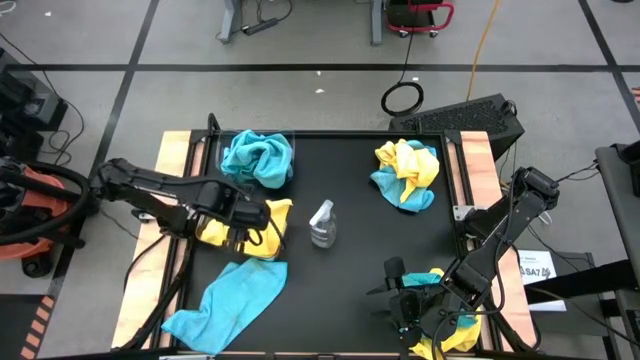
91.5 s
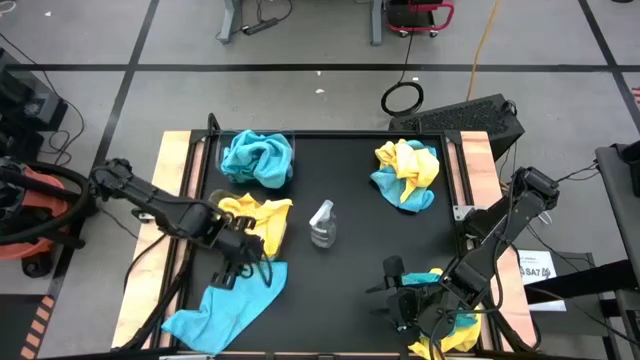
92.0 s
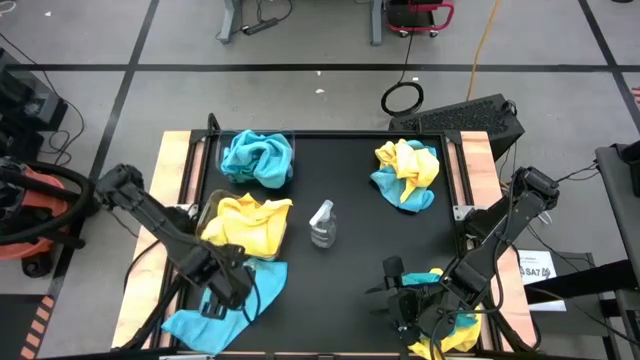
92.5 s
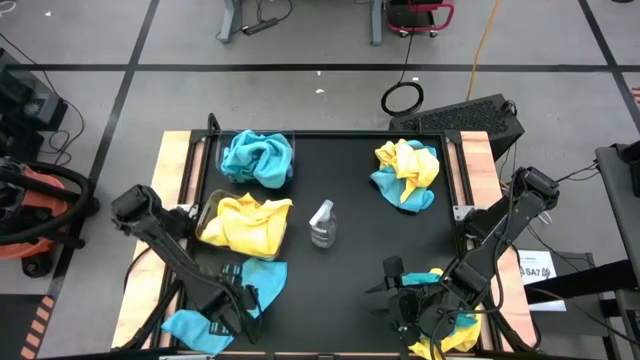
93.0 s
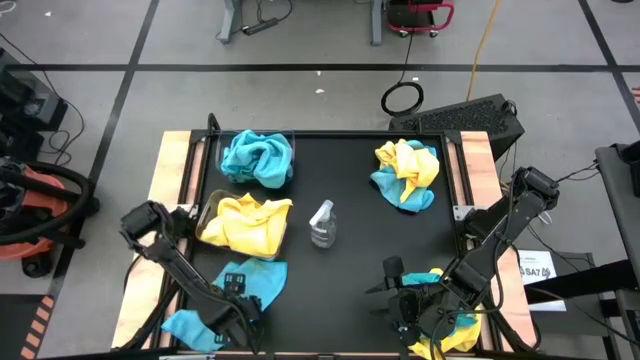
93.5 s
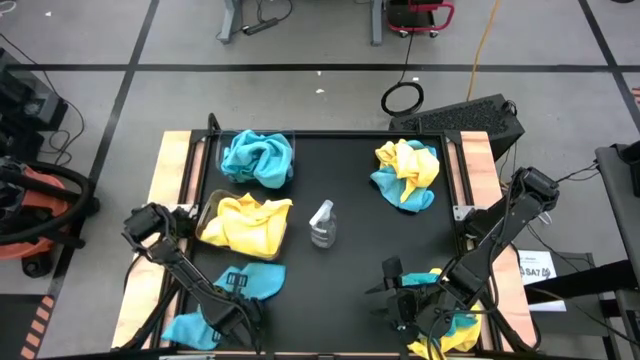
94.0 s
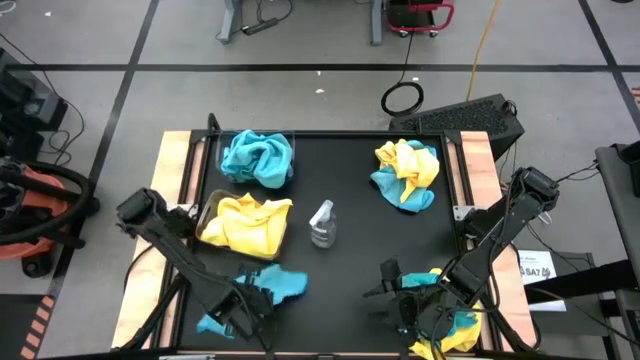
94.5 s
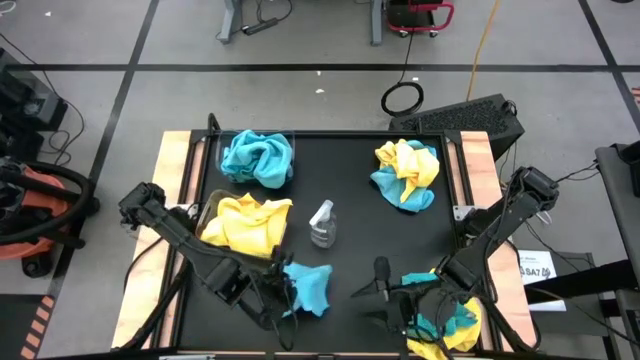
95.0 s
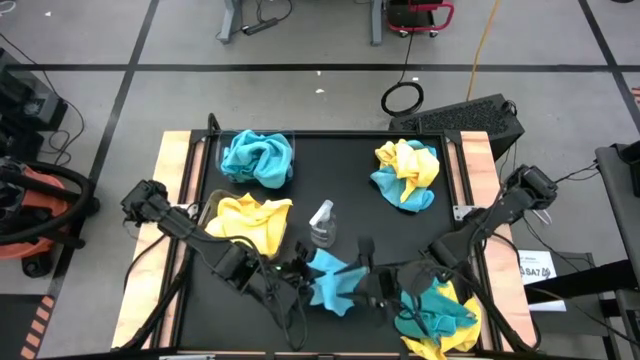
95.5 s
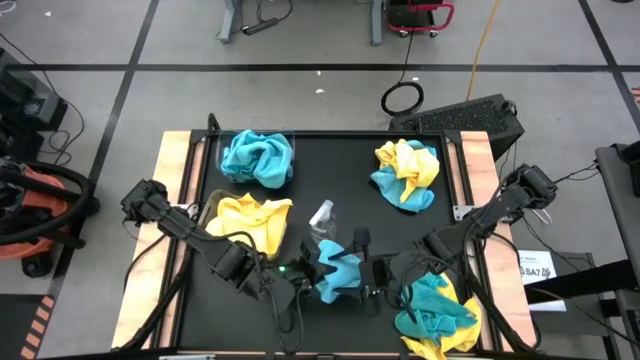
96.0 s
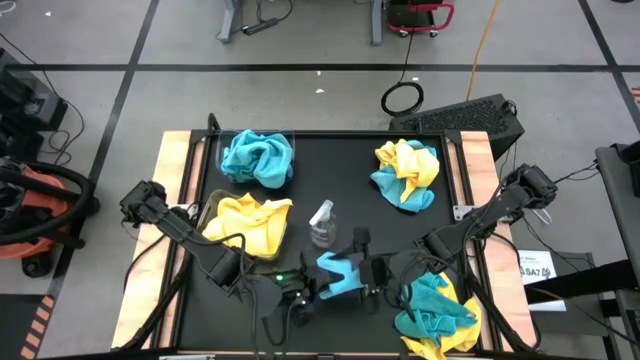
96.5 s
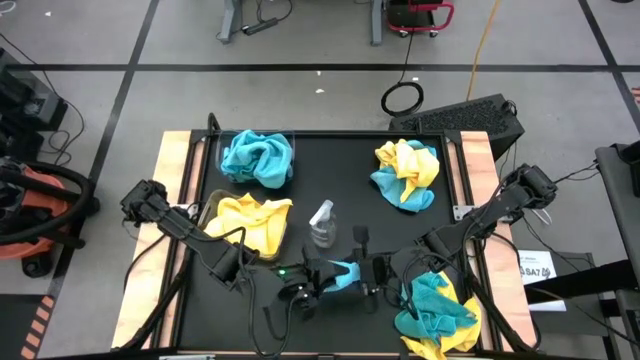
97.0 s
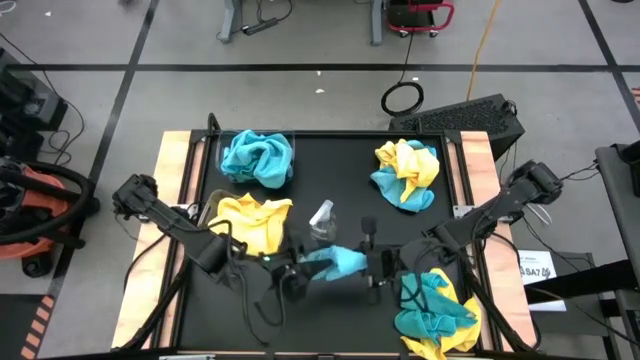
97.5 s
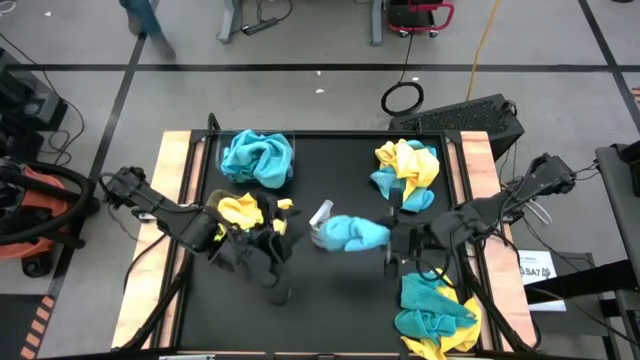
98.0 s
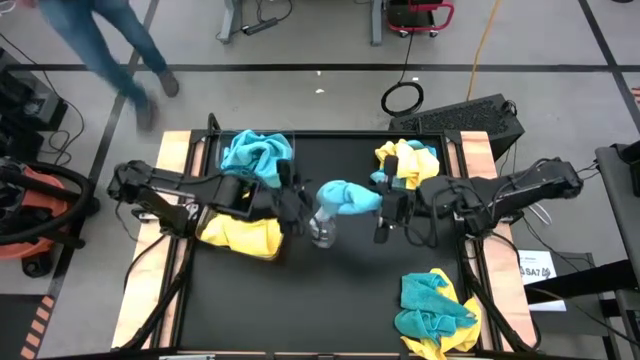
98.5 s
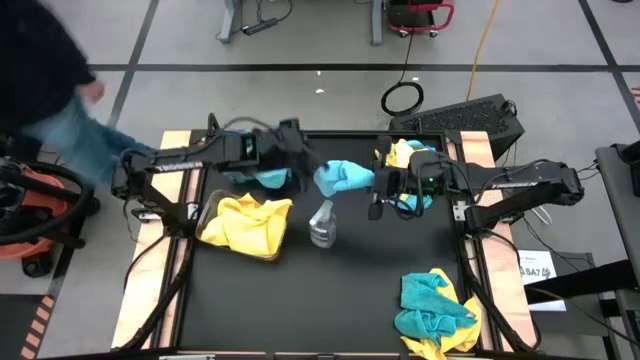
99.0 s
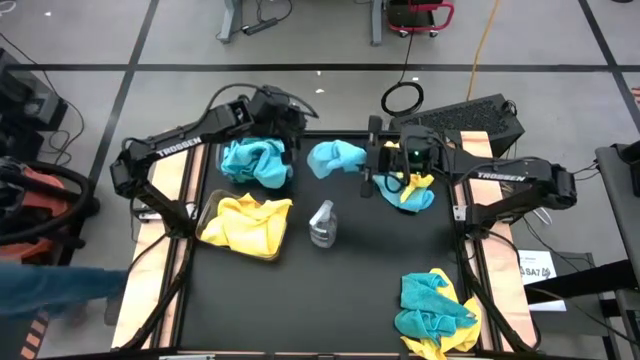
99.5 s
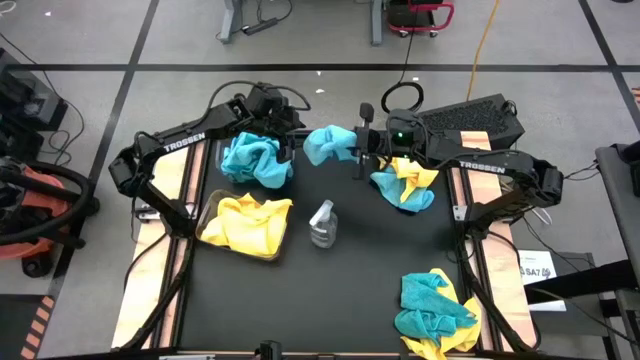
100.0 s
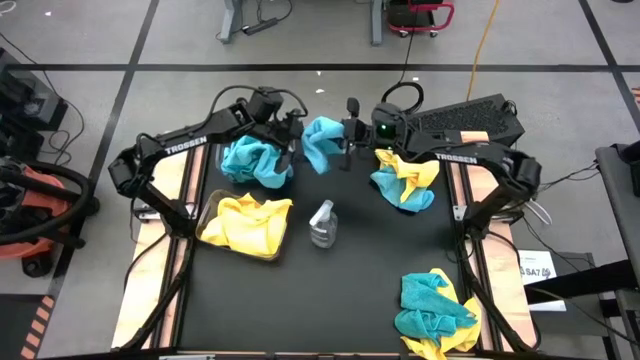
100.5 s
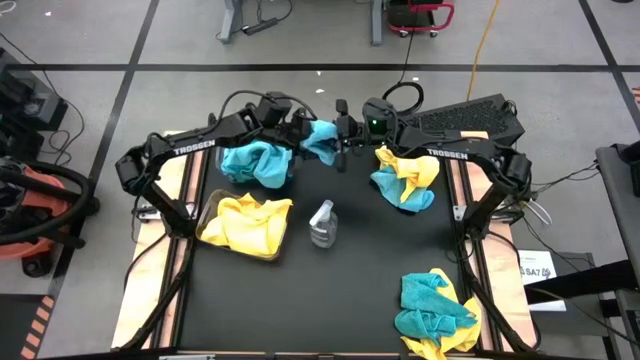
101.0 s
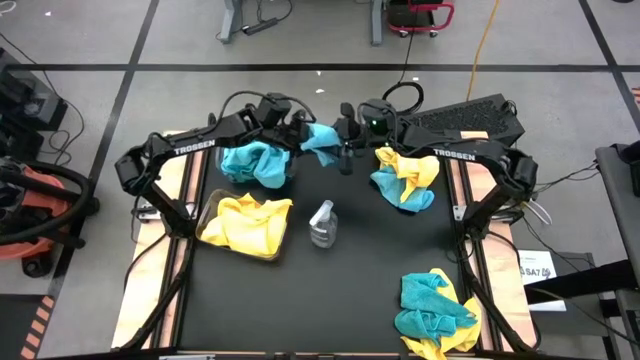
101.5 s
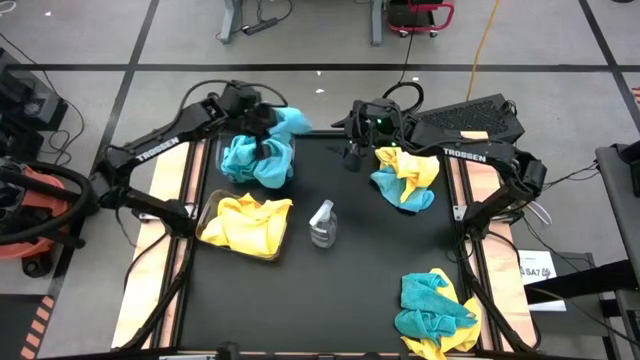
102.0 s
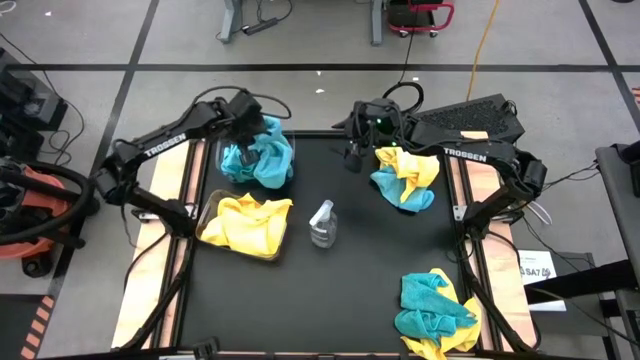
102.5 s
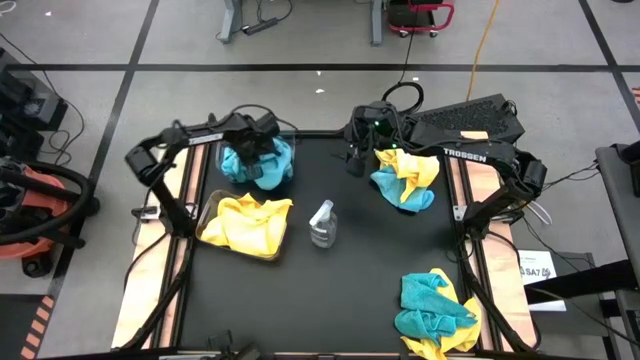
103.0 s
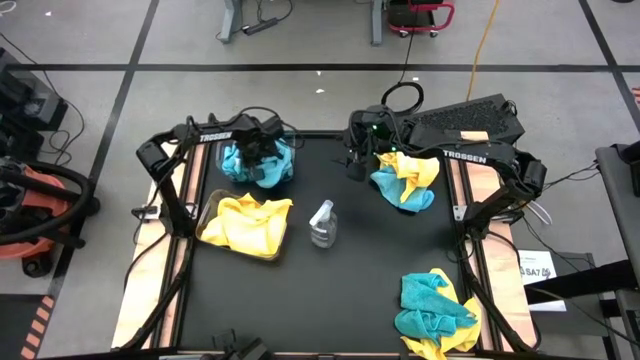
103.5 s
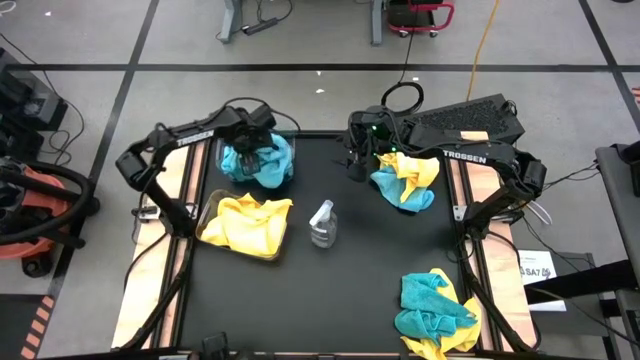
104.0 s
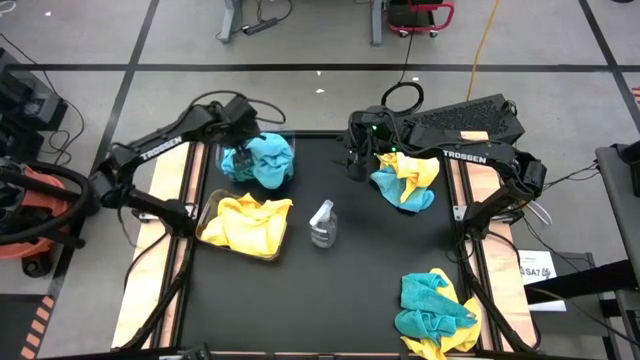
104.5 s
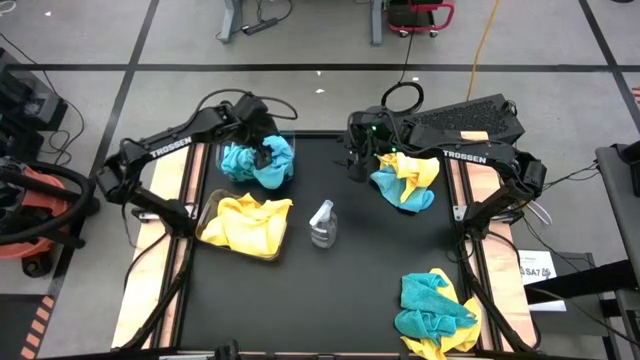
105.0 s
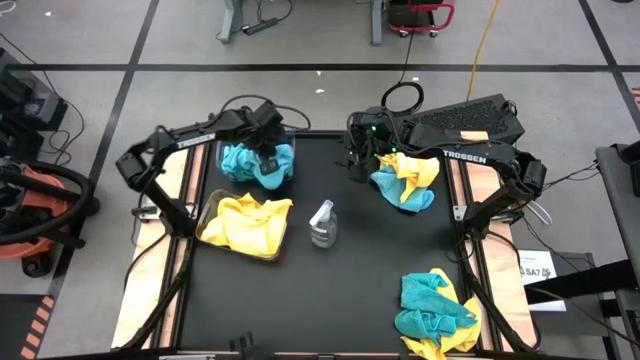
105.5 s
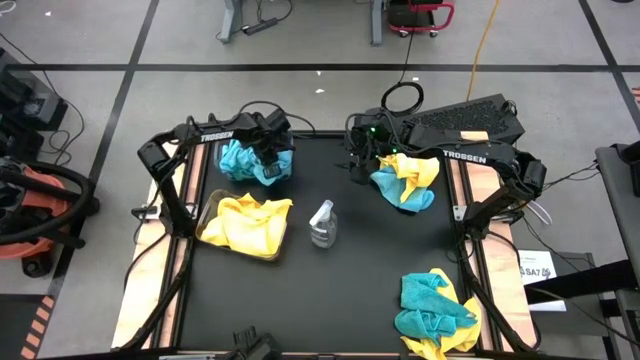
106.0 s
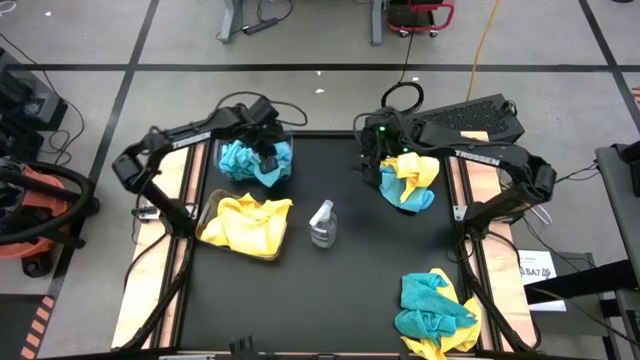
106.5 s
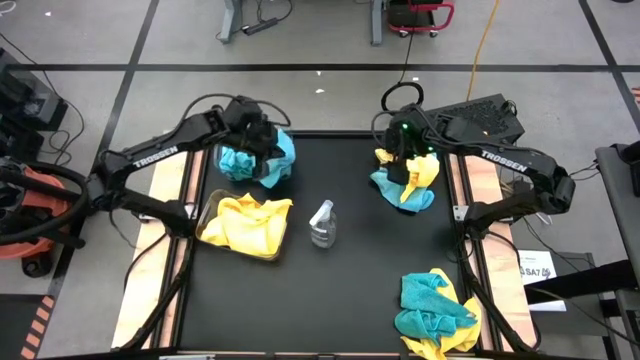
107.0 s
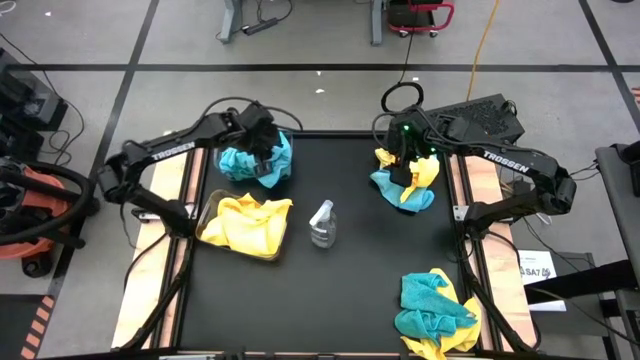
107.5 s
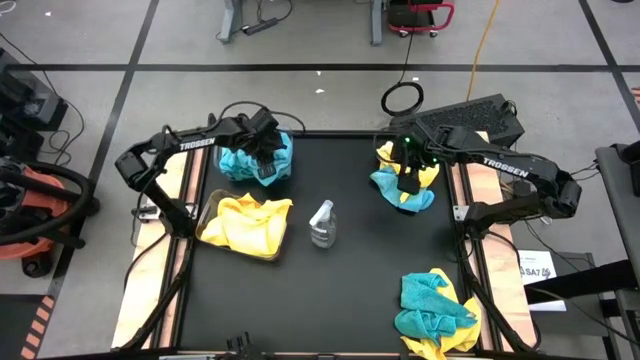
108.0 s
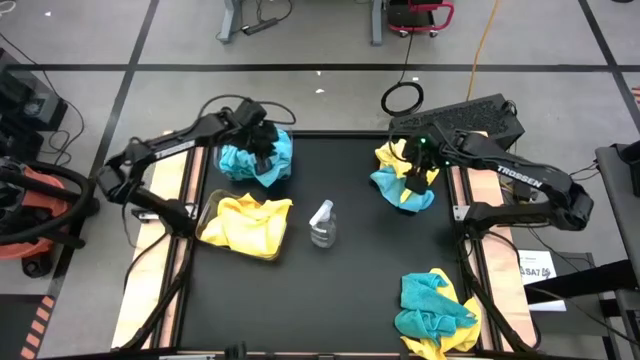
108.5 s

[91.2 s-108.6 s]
Task: Sort microfiber towel by color & place in baskets
Put the blue microfiber cloth into the top transparent bin

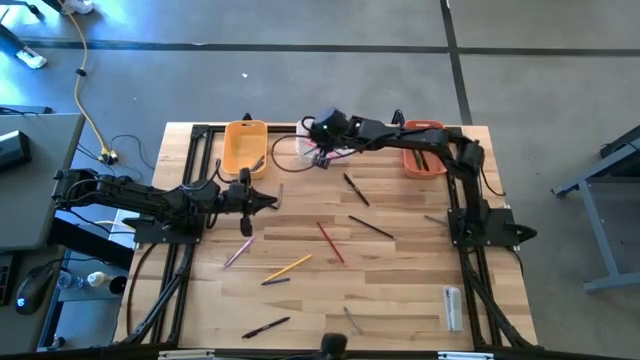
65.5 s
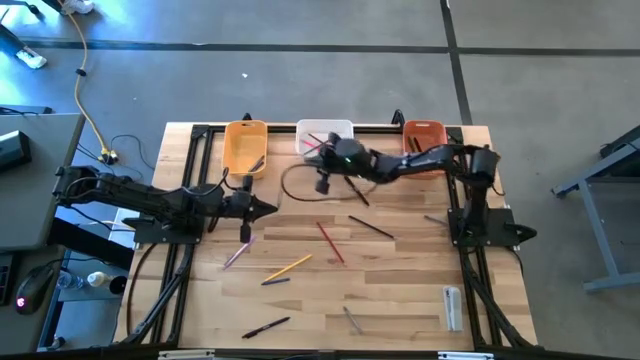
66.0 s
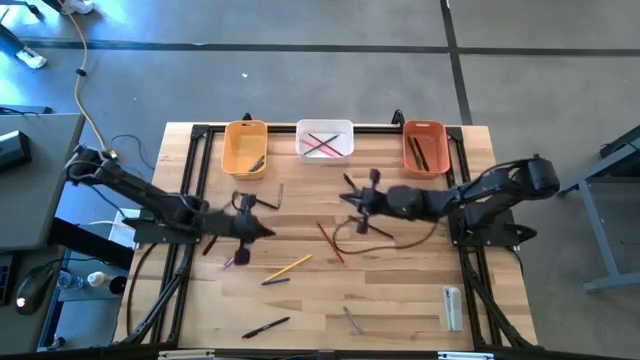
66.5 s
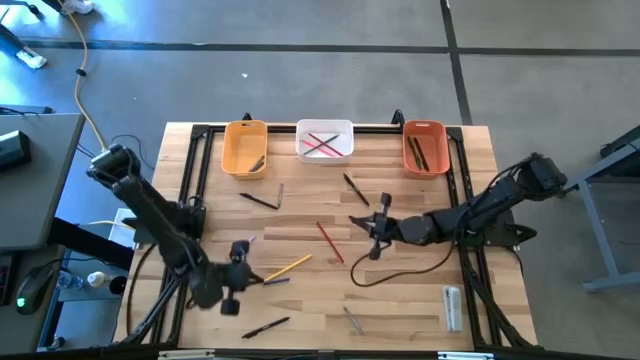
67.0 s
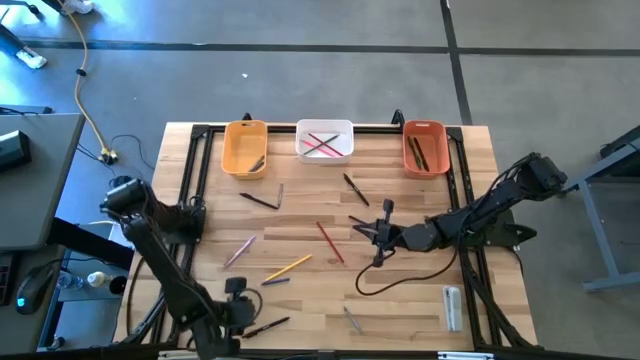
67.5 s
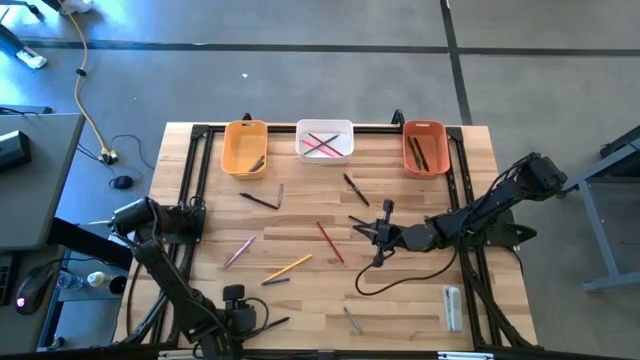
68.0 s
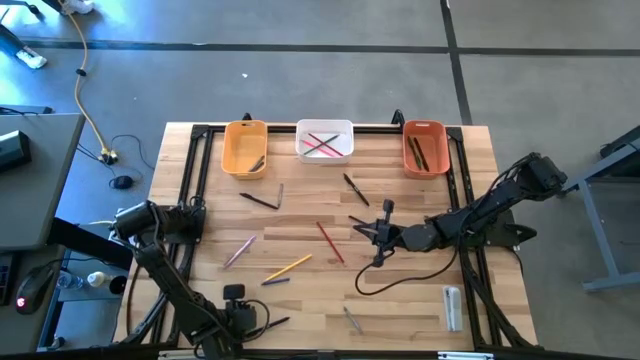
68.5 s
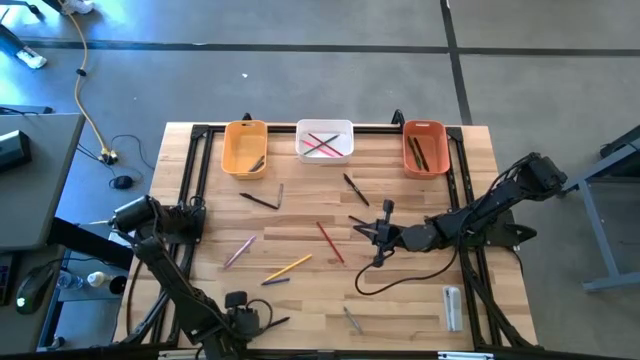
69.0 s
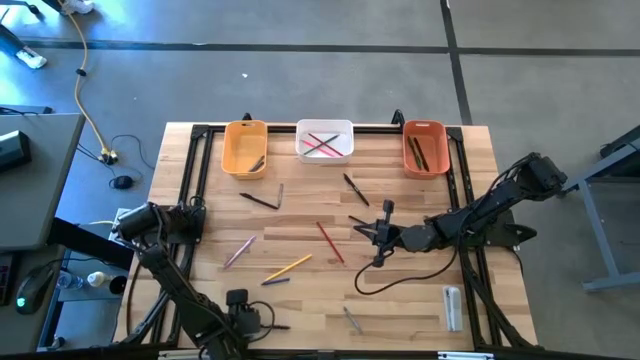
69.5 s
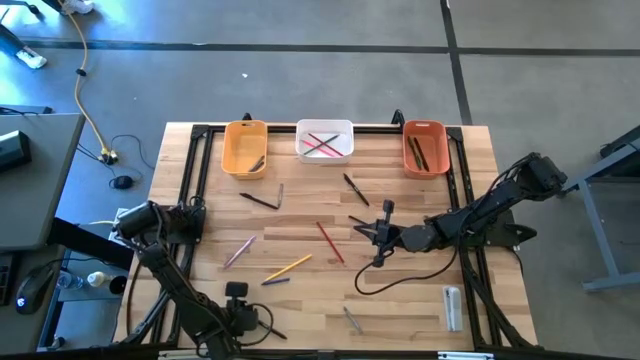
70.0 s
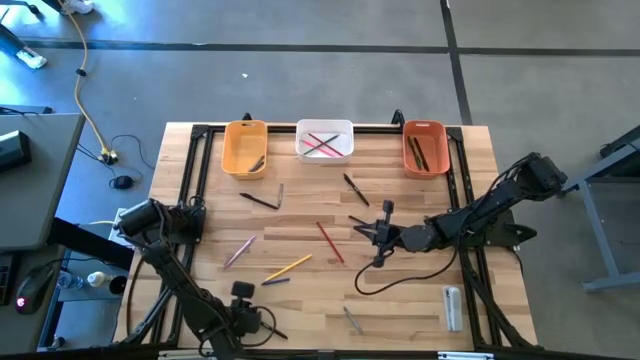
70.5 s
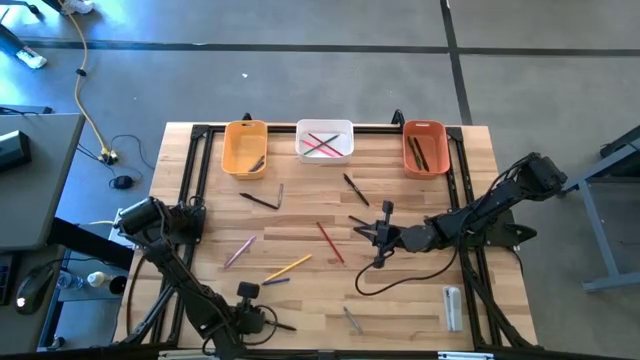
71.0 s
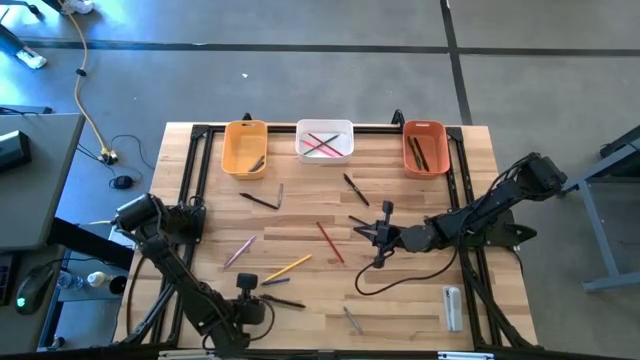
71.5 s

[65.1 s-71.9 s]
Task: Sort crayons/erasers/pens/pencils in bins
Put the black pen into the orange bin
